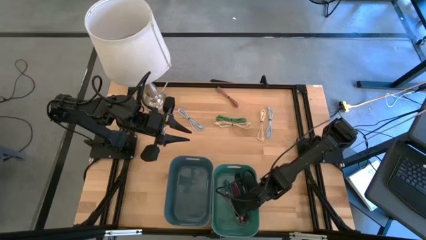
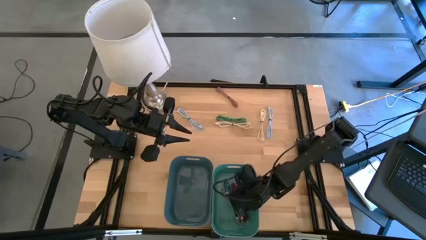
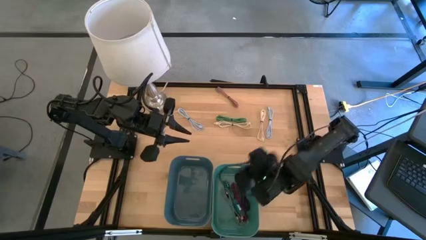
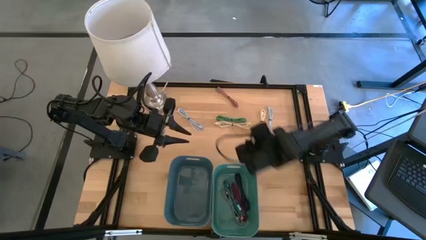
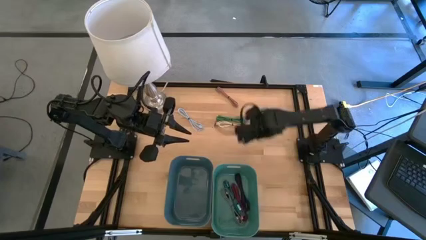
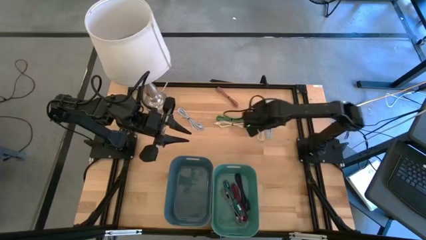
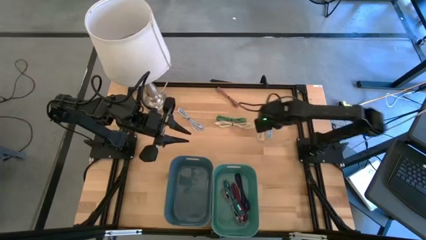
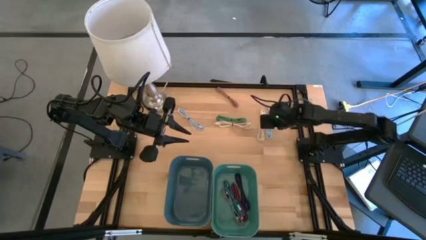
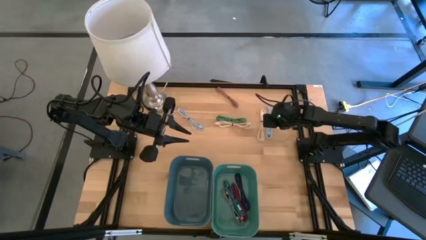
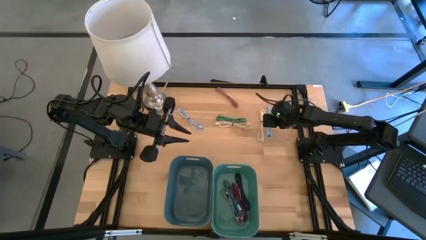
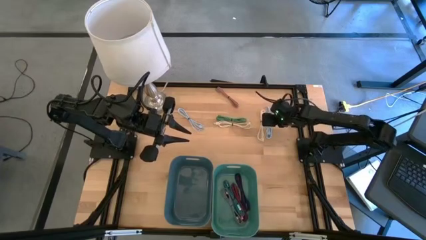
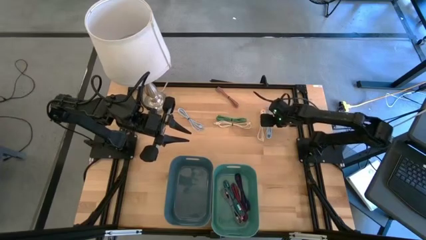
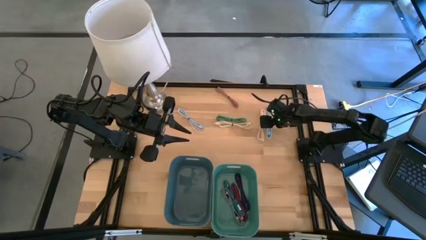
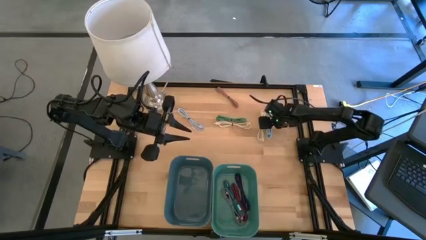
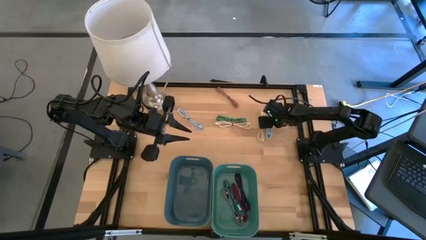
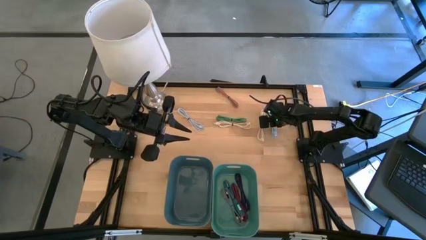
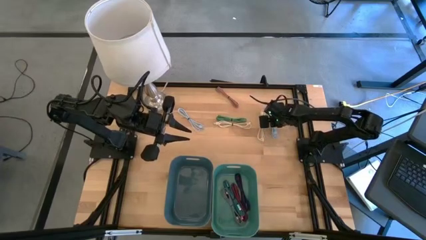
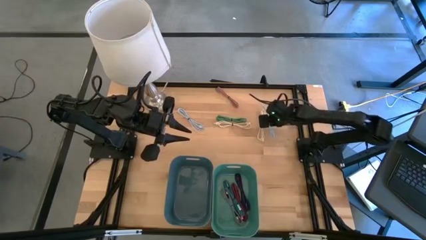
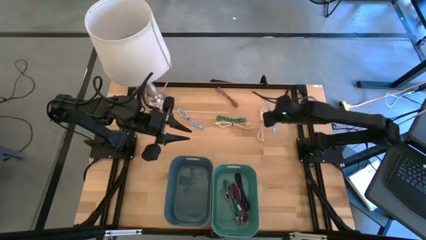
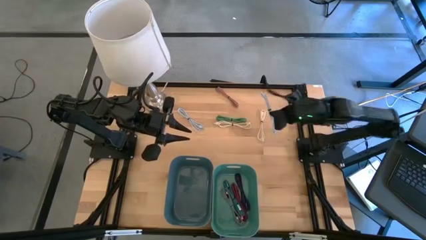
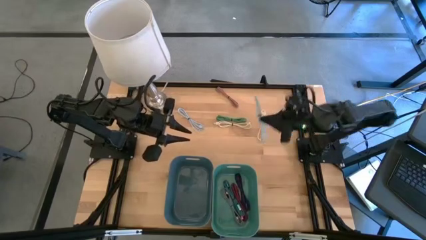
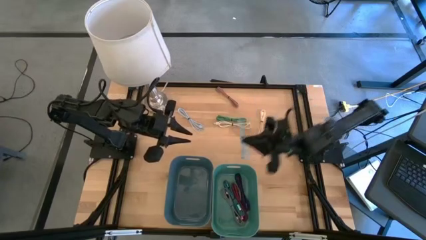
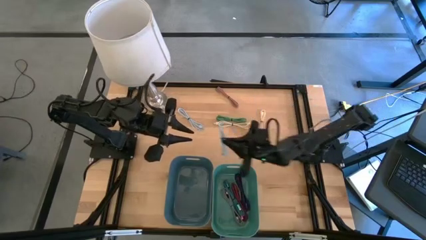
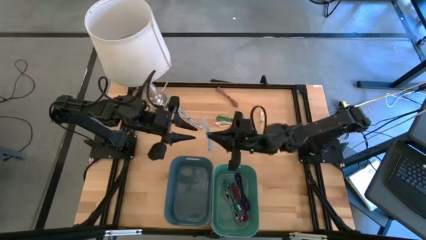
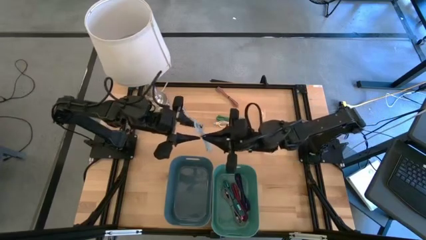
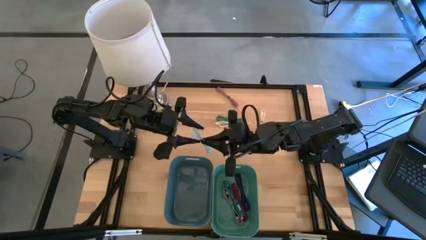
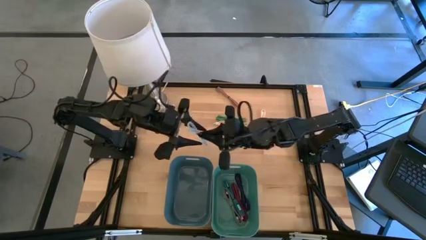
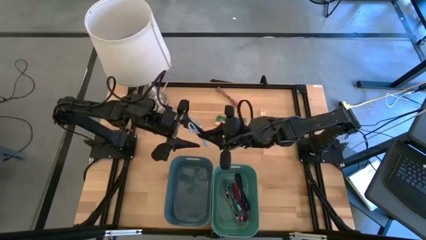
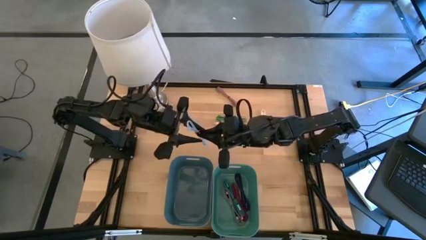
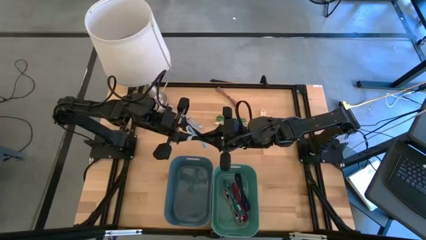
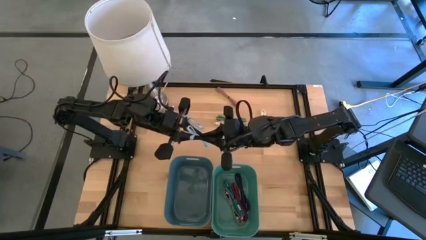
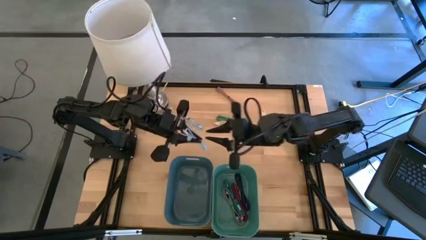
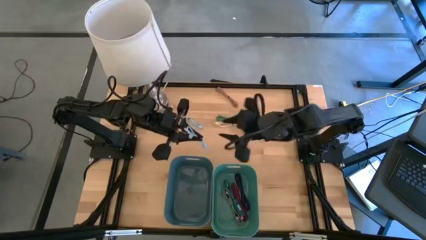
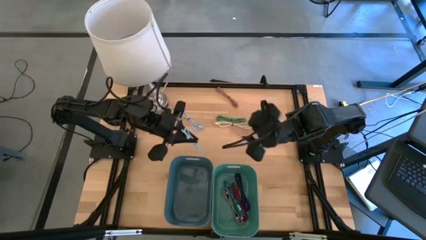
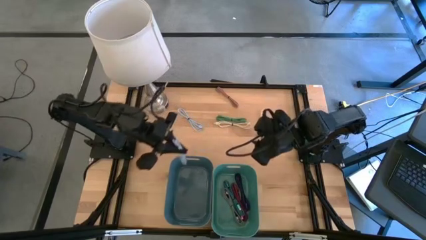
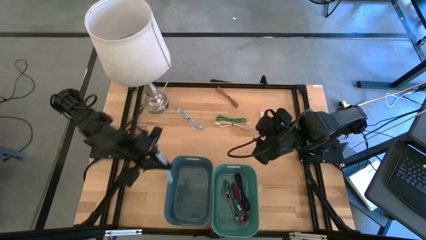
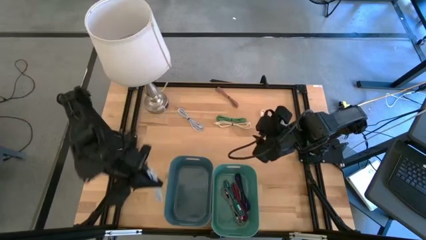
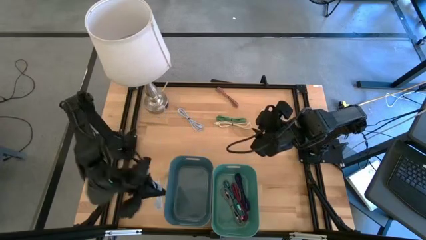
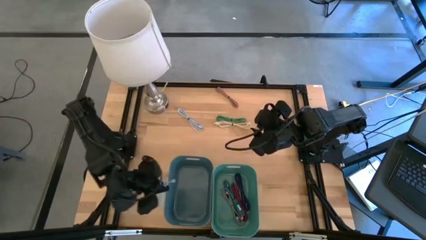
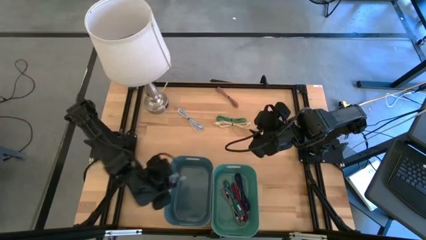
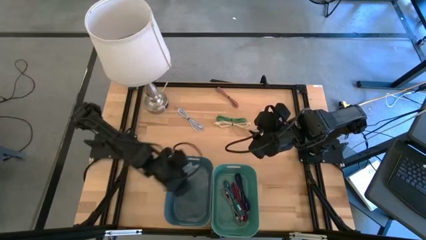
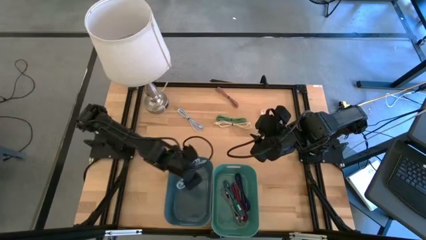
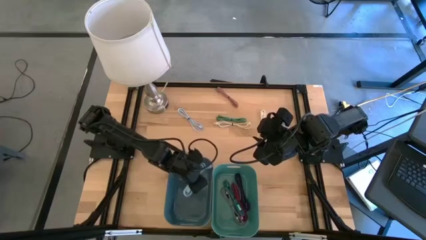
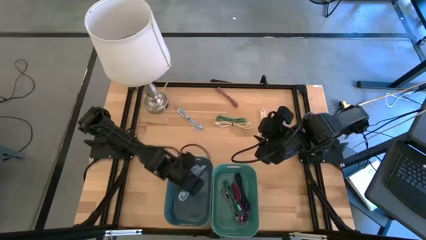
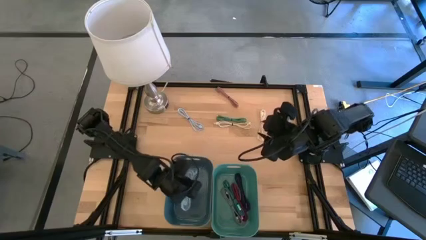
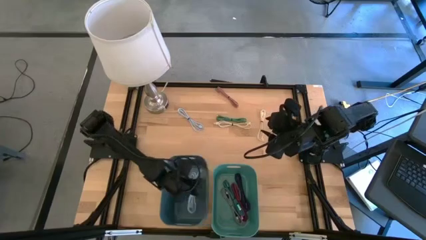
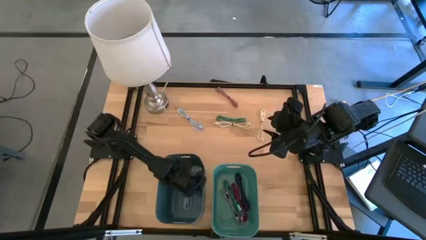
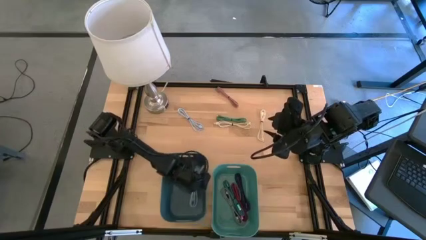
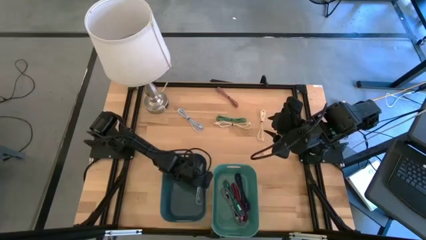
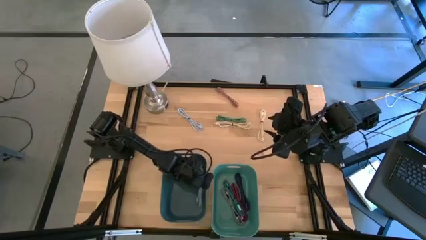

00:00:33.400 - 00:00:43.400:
Put the right light blue charger cable into the blue container

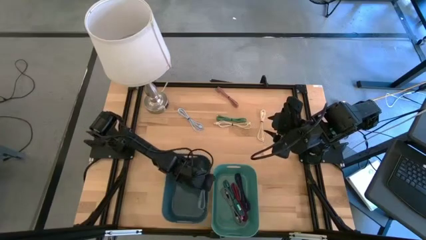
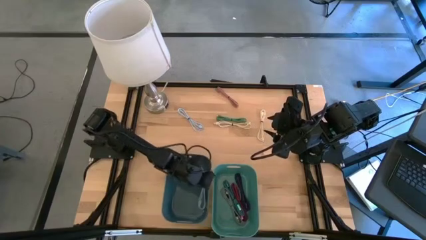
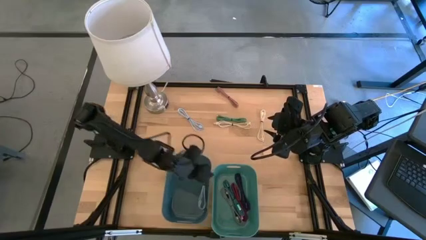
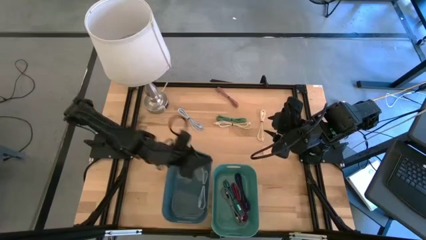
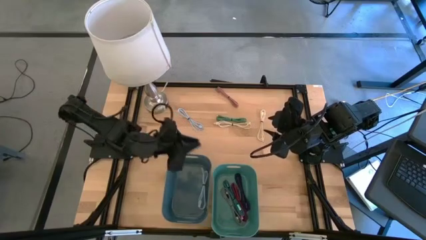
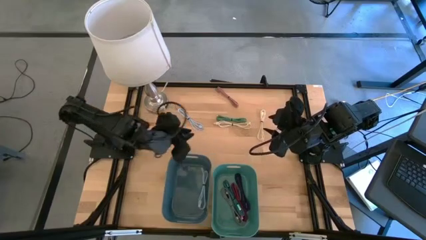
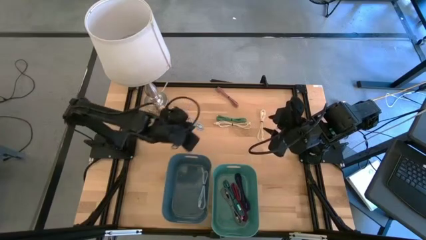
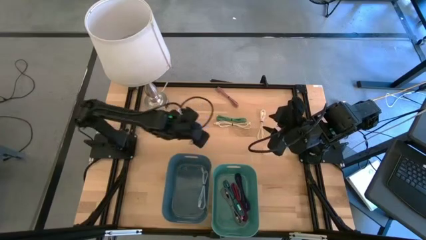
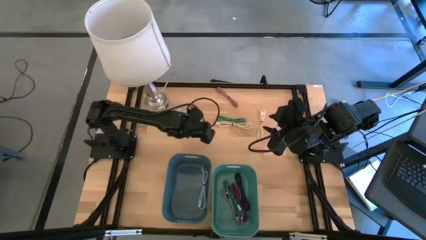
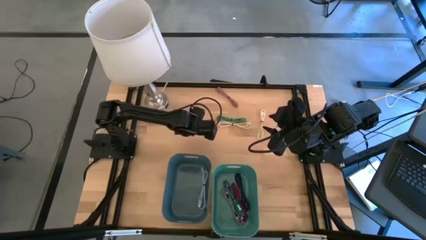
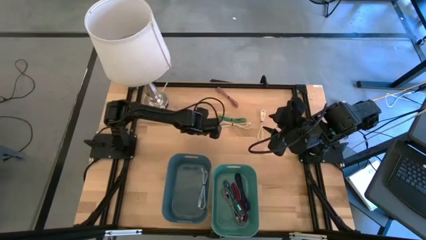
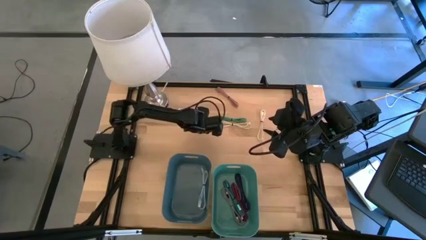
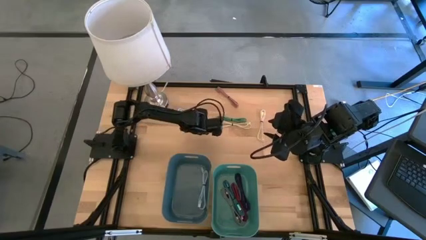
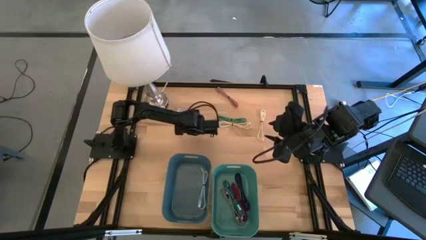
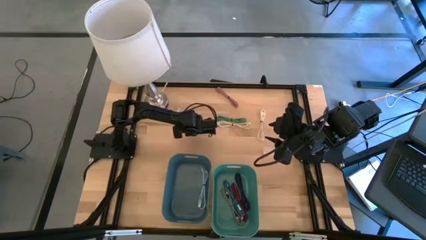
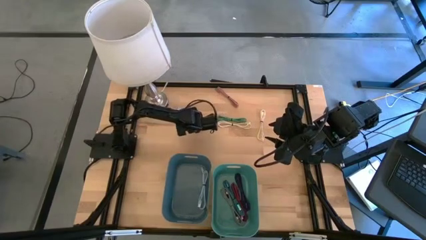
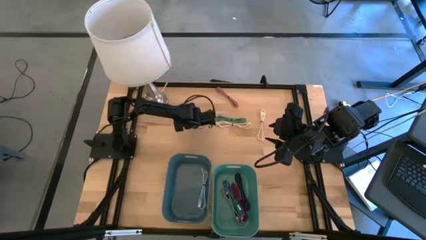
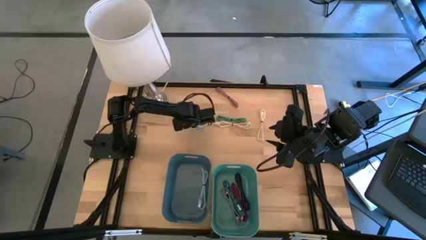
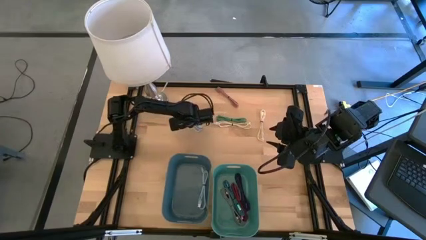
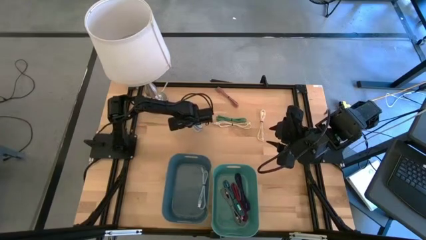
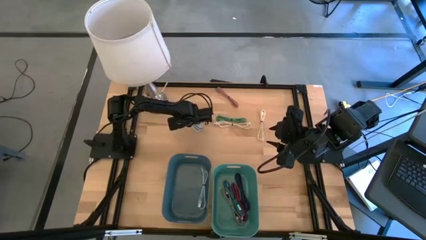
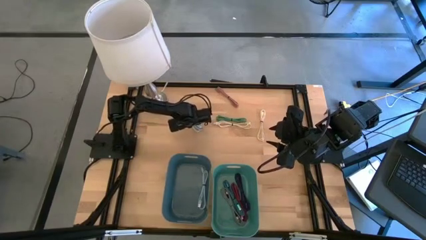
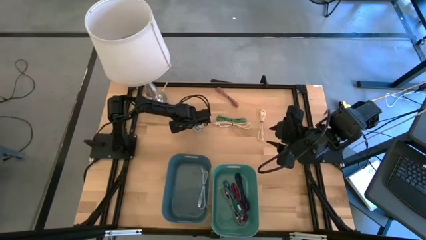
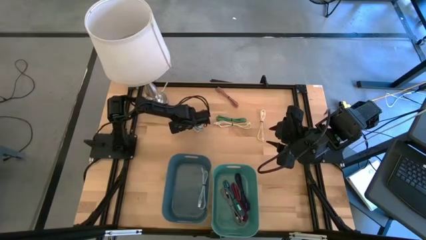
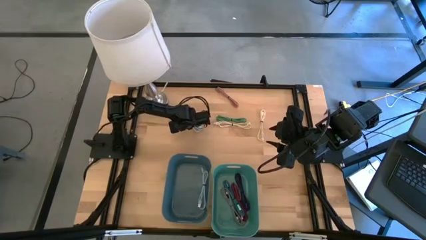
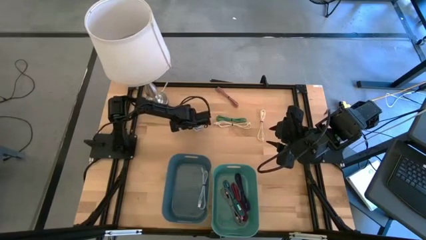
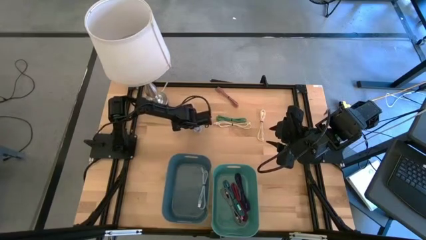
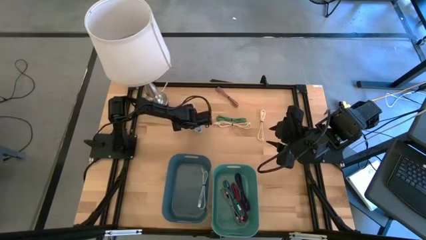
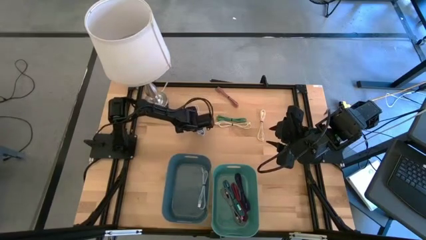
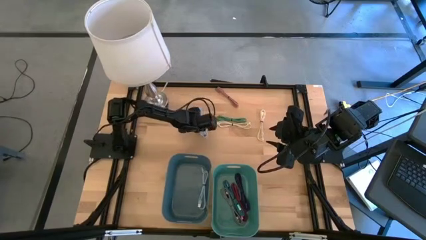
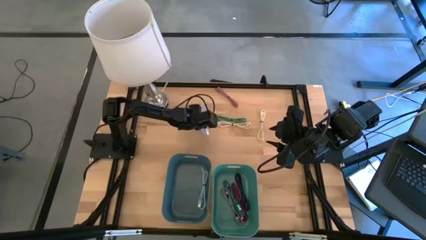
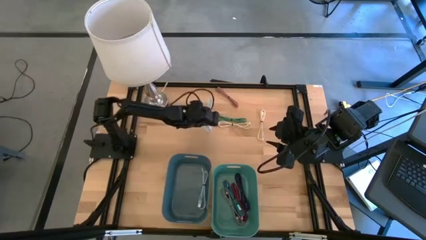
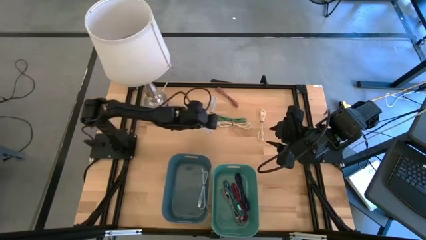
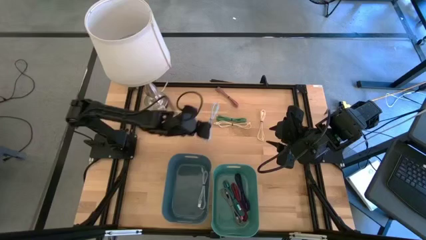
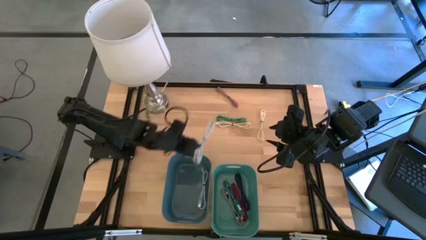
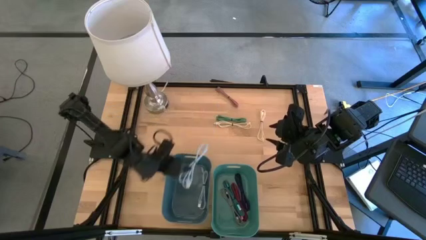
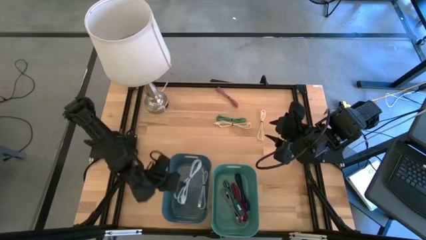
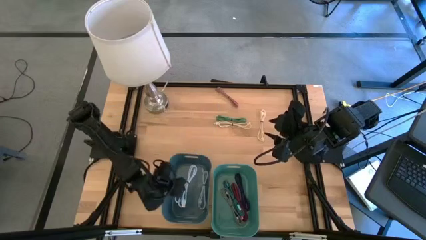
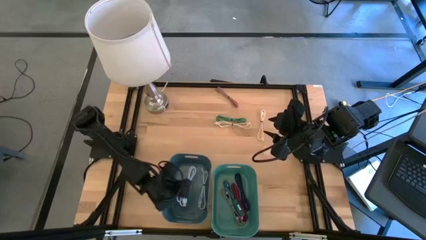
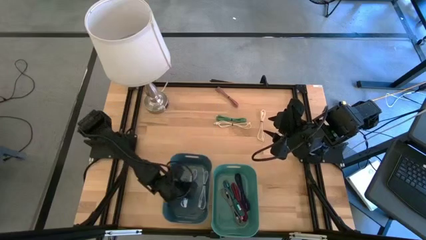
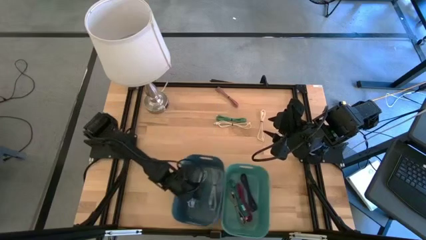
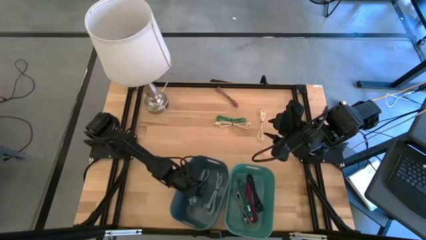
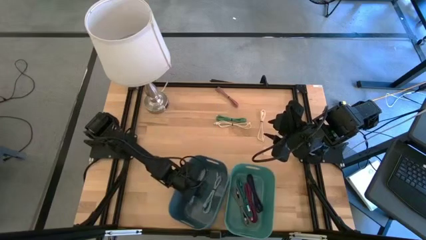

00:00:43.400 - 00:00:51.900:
Put the light blue charger cable into the blue container
